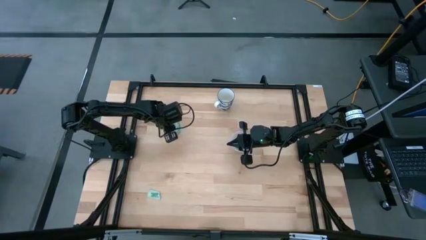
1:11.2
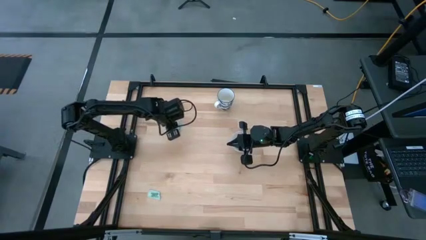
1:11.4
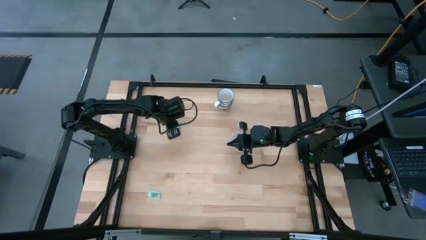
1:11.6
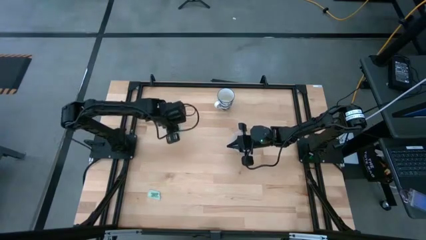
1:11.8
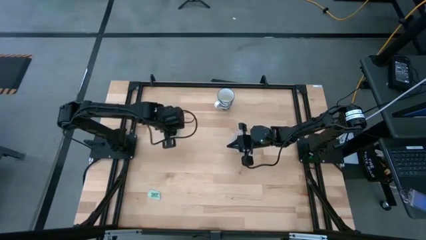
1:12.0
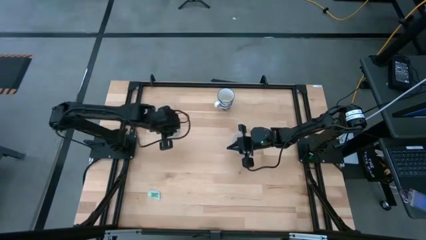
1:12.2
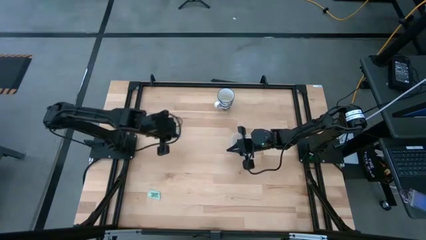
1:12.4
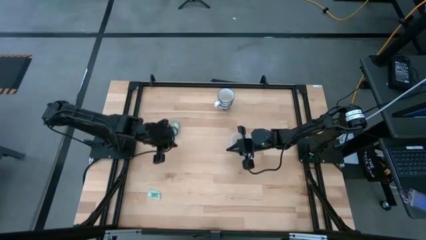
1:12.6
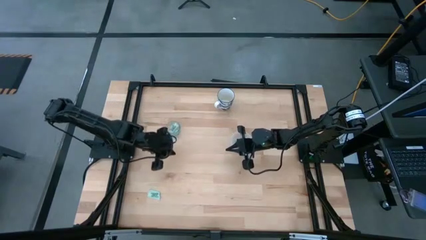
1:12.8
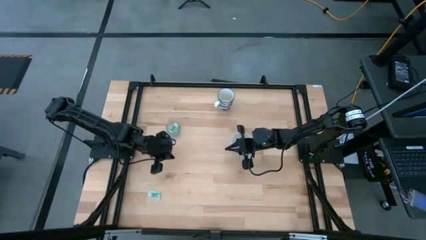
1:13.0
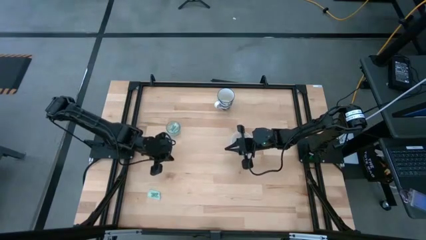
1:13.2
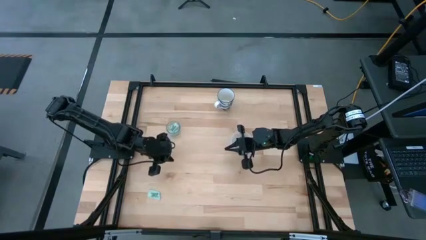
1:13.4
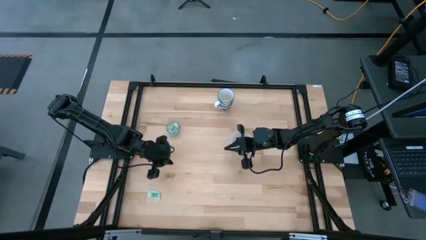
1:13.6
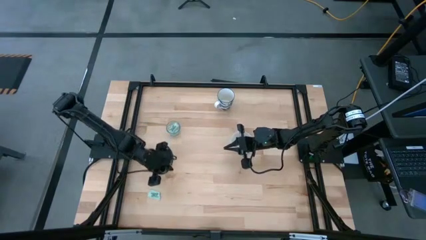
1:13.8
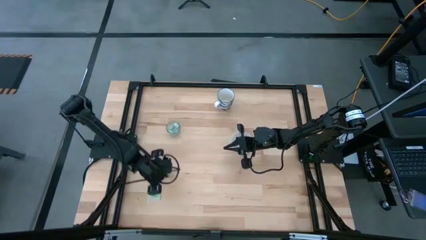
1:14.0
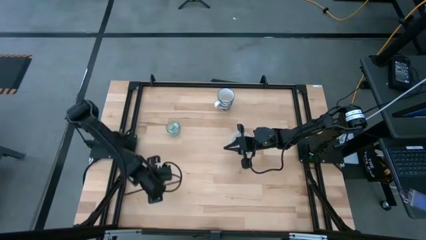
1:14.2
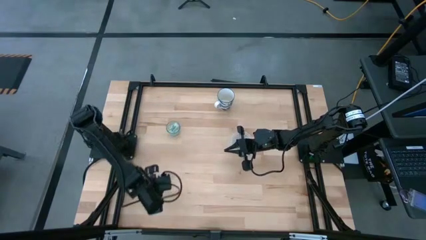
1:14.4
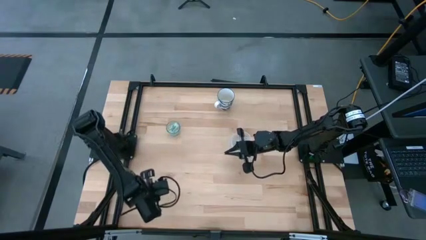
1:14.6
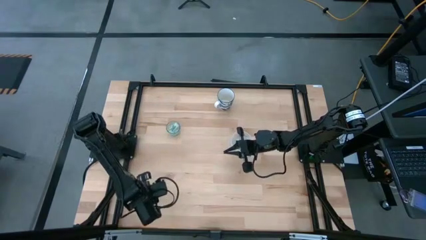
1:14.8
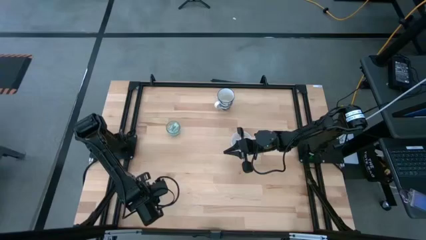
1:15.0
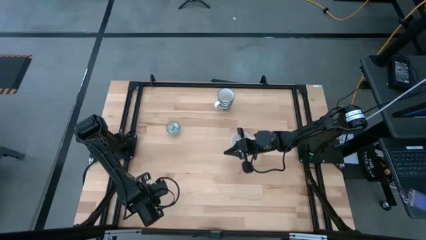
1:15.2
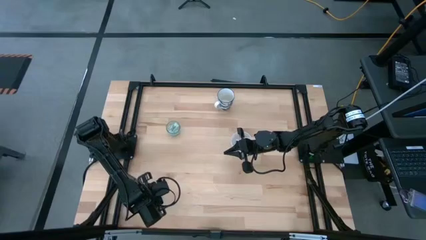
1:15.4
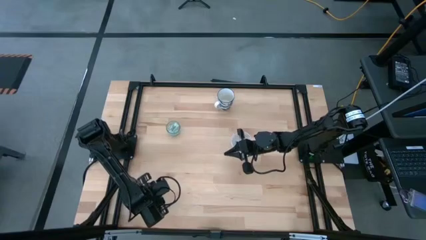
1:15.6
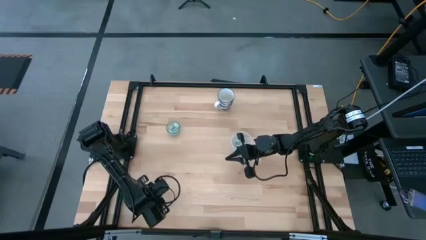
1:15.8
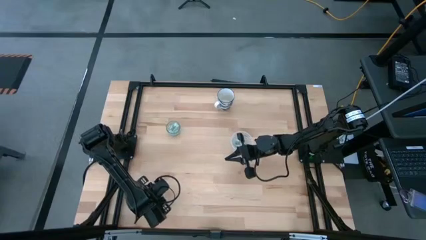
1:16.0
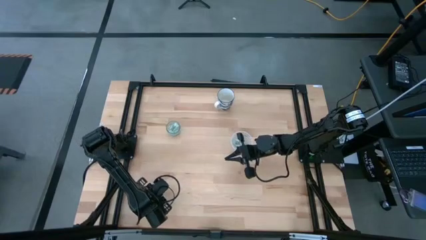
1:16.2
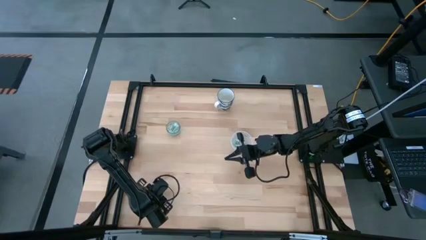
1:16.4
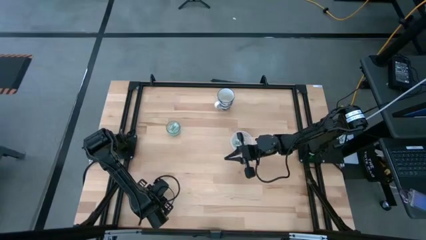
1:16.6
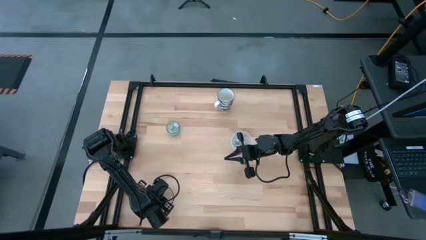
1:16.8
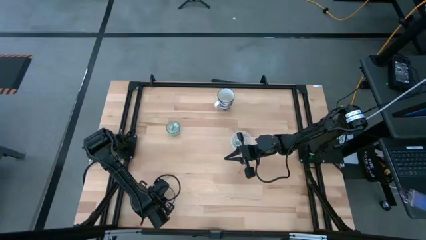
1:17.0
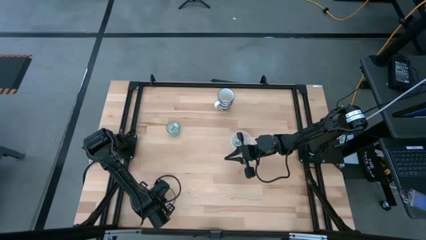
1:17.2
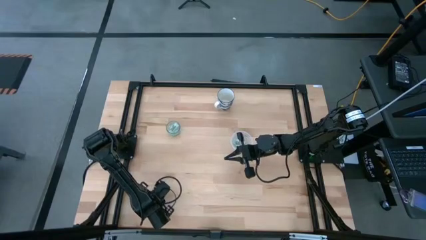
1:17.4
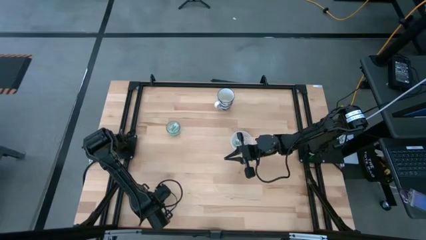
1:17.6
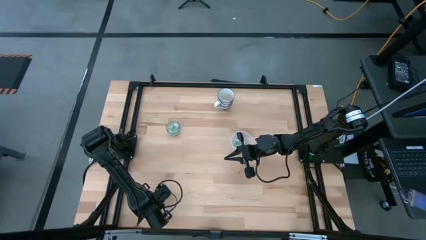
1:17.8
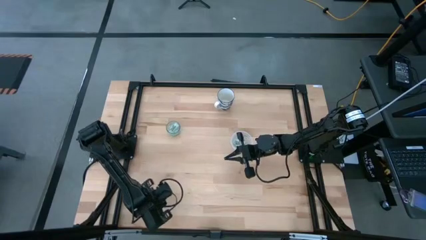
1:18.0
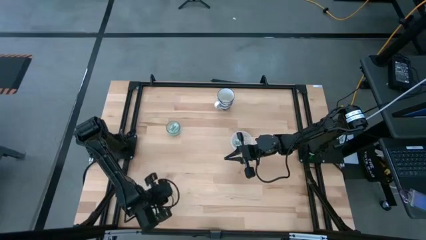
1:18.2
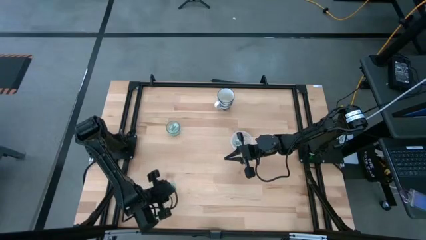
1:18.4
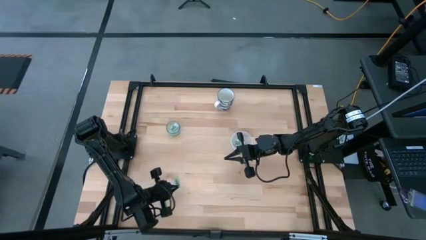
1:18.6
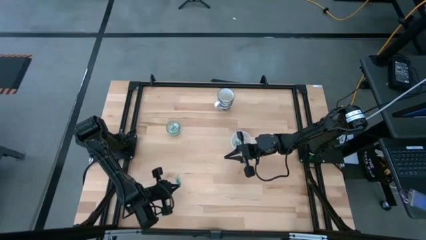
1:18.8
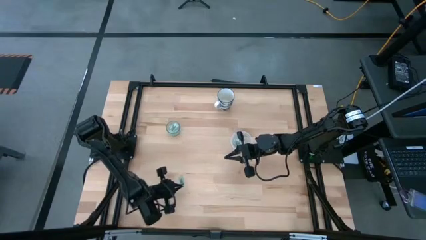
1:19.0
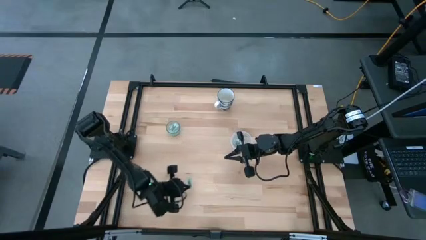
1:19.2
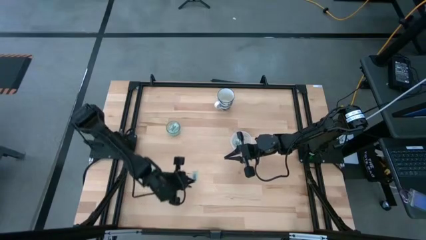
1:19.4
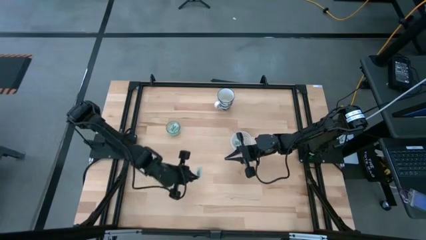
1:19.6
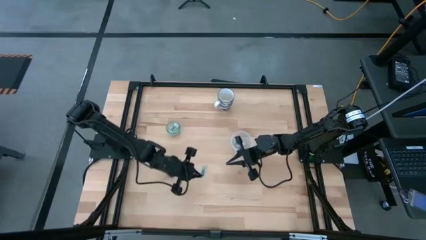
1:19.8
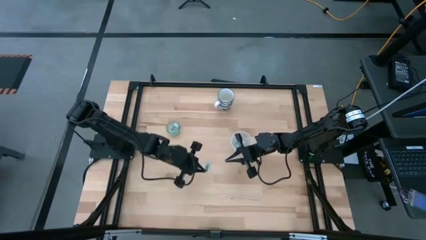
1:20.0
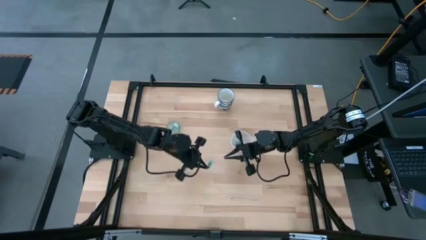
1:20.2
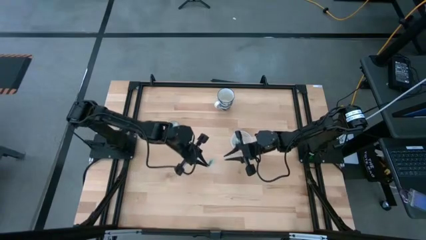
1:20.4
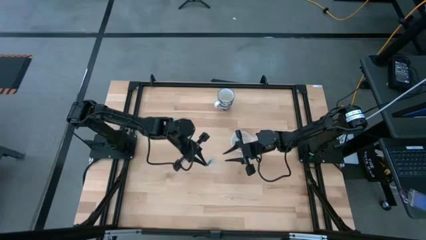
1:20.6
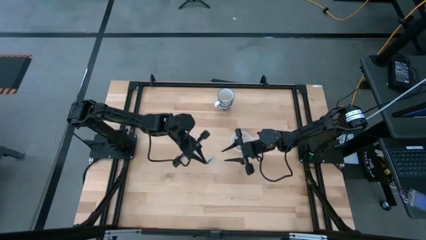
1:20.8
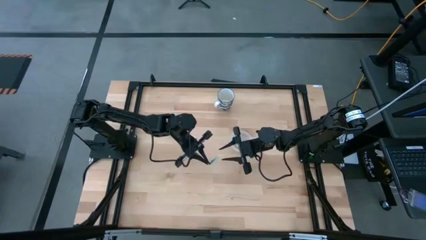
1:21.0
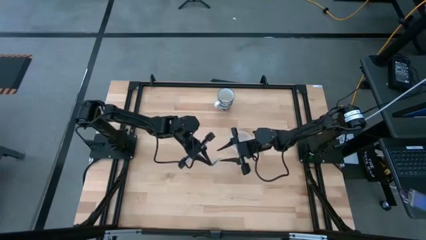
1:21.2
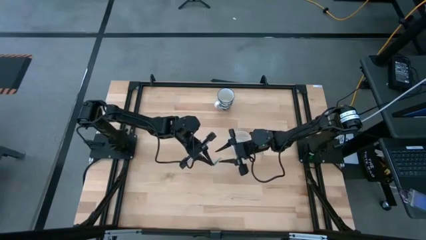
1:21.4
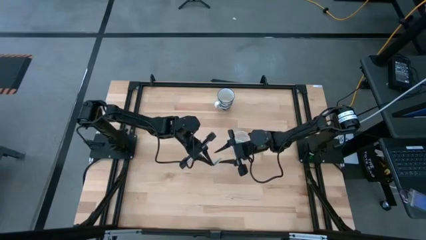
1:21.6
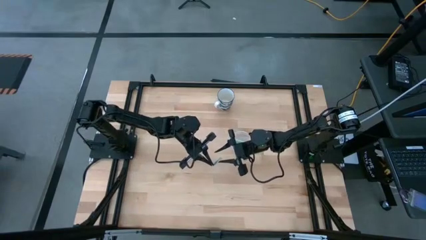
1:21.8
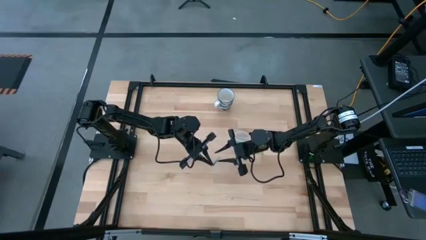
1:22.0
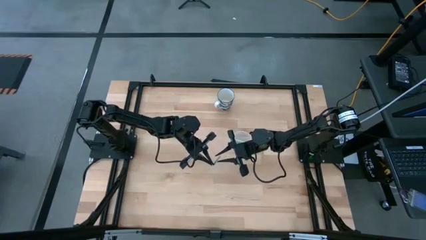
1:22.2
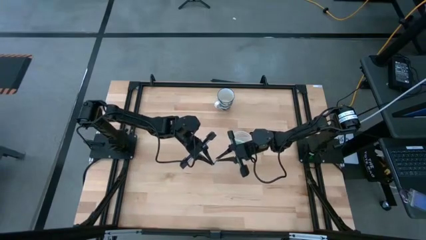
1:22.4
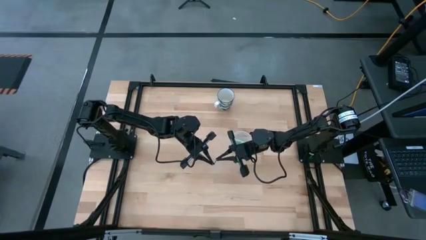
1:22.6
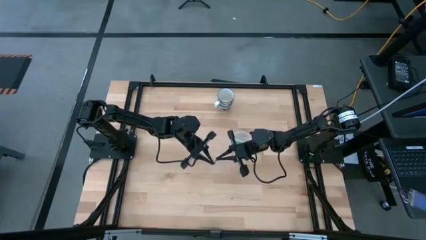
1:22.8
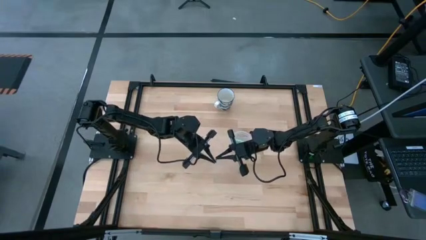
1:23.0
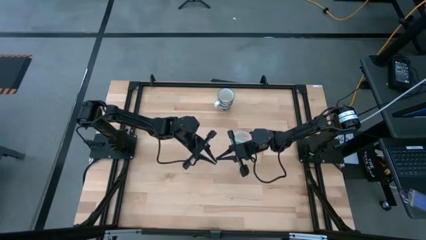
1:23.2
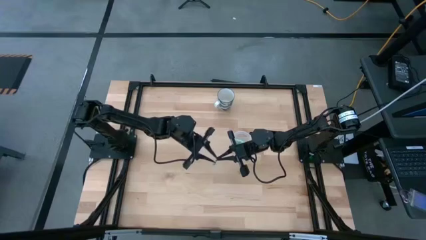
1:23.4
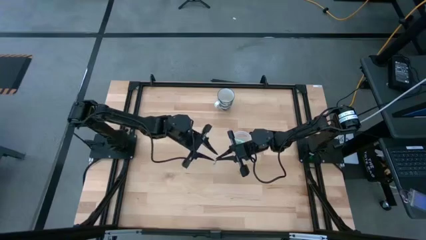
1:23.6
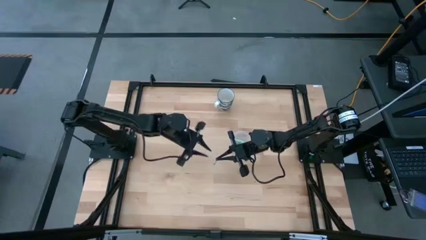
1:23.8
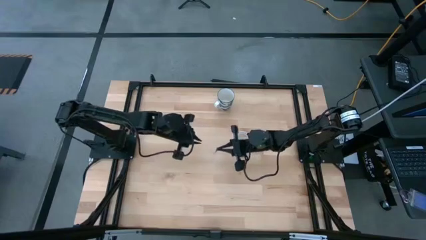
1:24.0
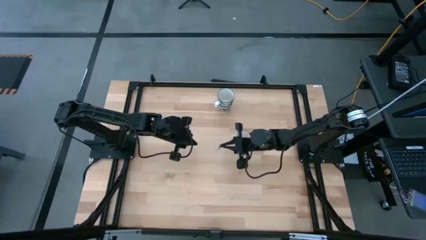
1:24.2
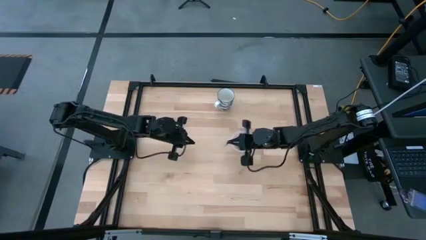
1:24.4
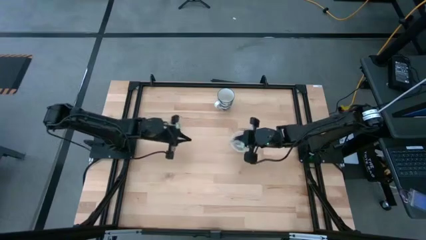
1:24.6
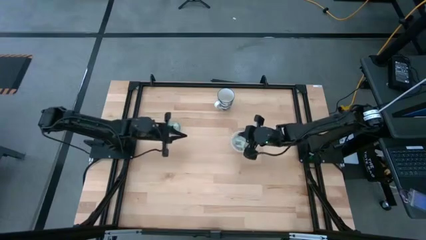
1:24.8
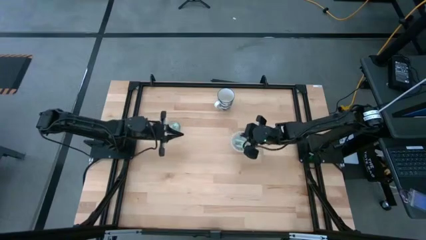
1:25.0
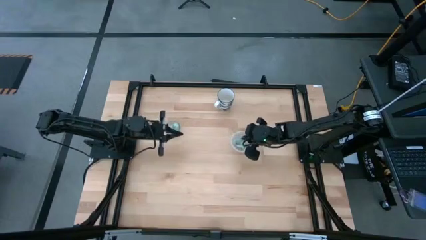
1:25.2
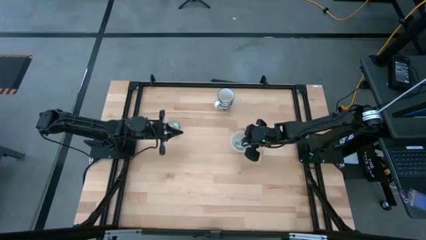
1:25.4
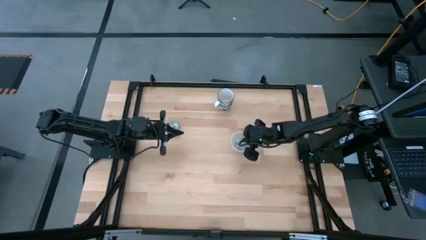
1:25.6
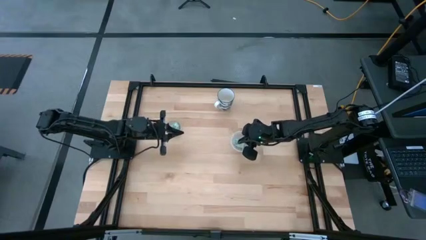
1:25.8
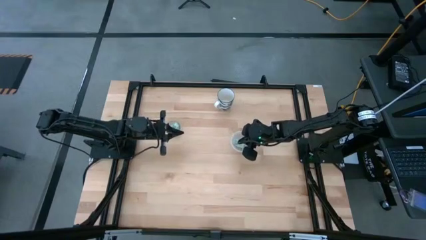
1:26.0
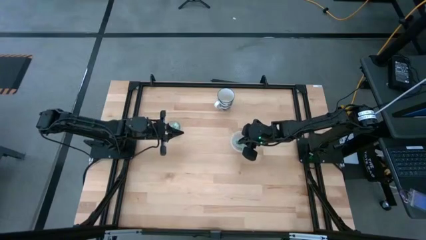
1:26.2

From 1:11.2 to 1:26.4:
Task: Pick and place Stevia / Truvia into bins
Put the stevia packet into the transparent container
